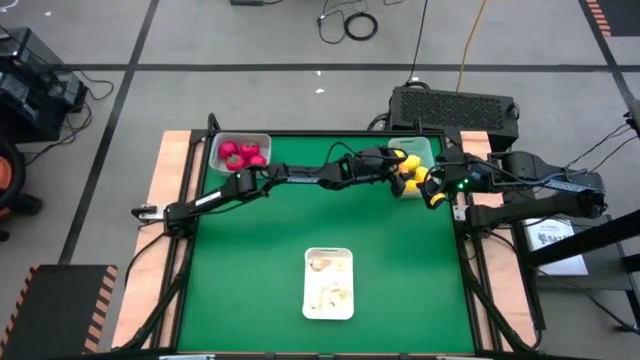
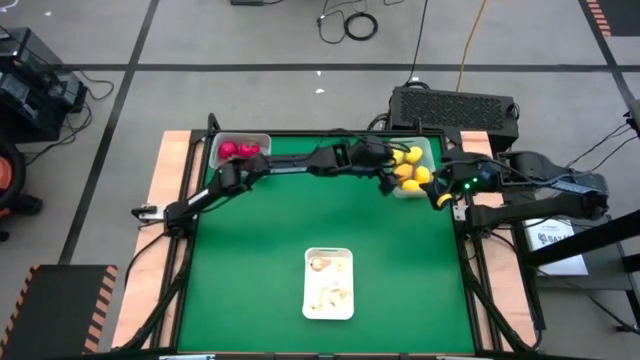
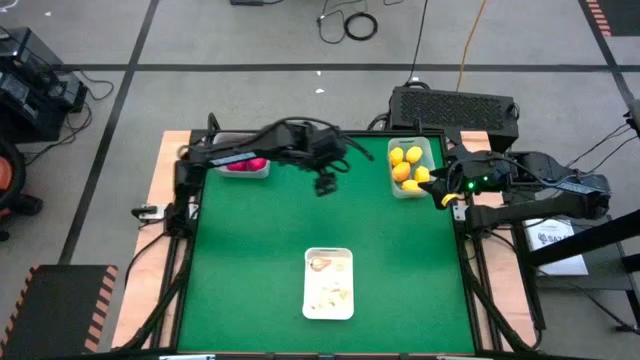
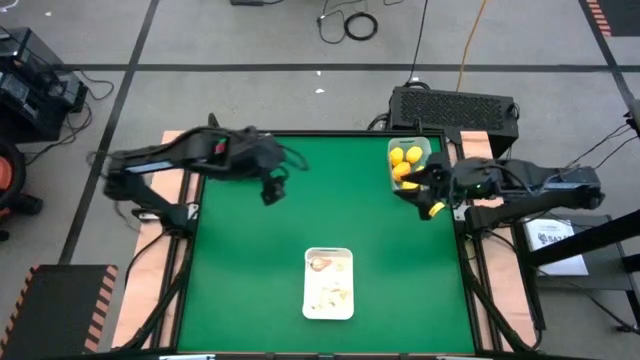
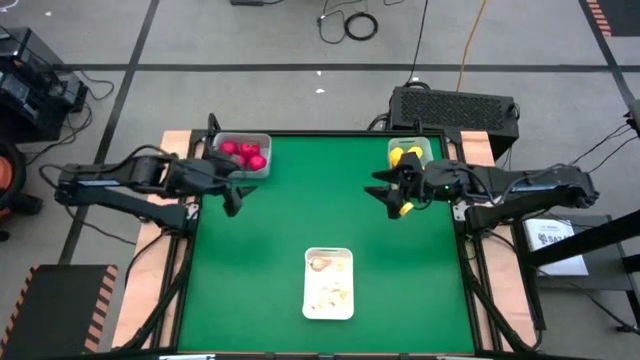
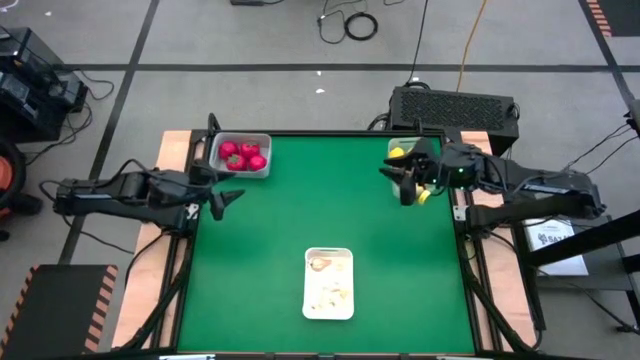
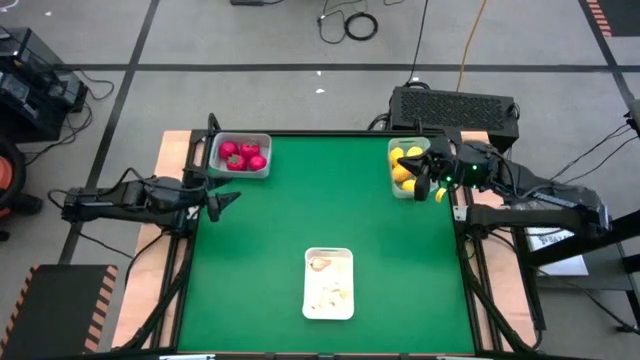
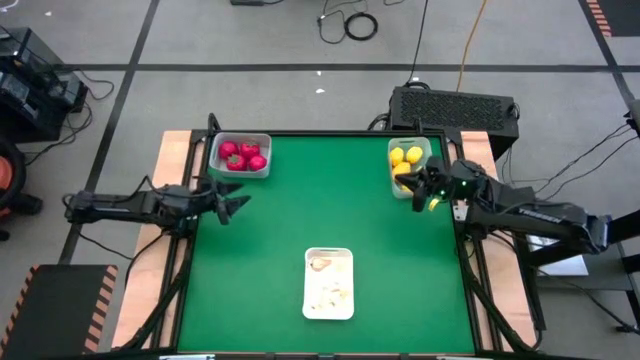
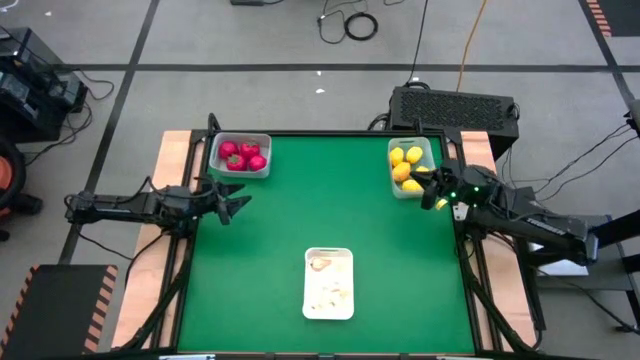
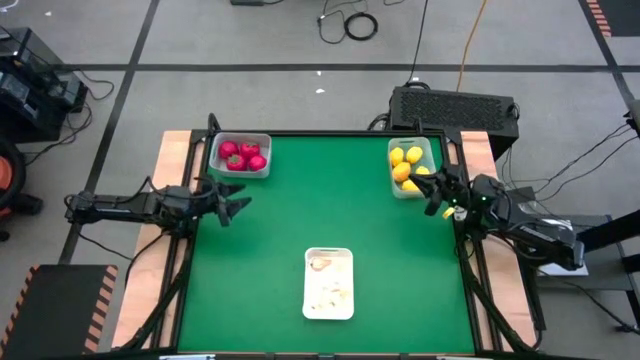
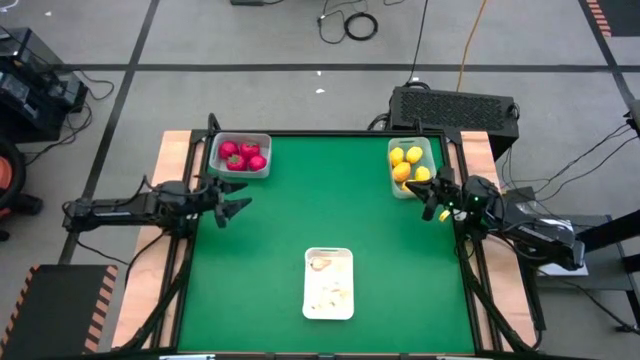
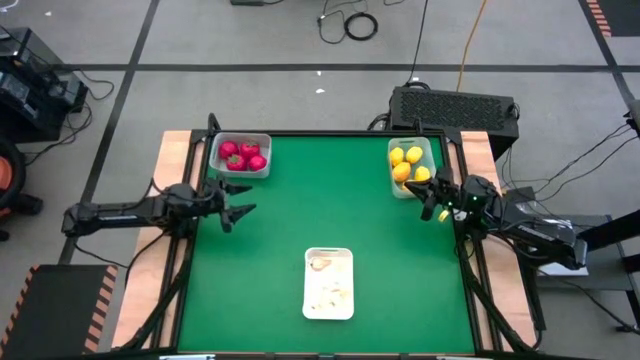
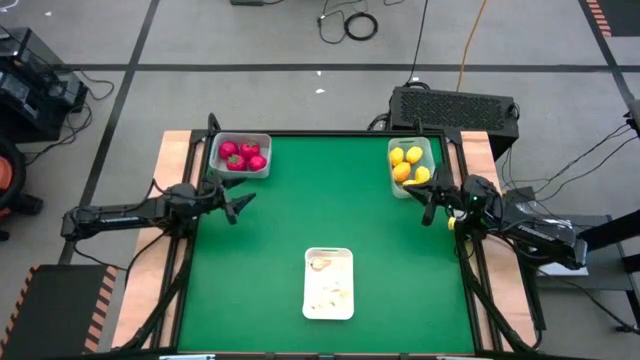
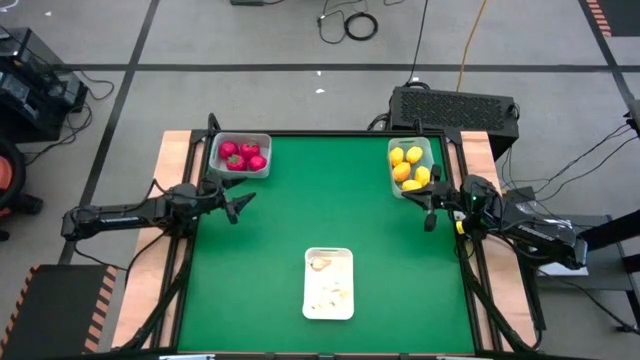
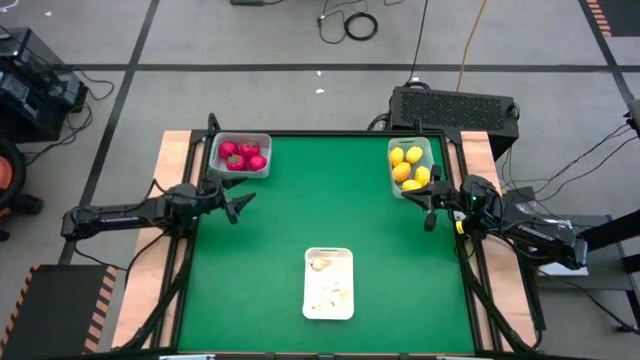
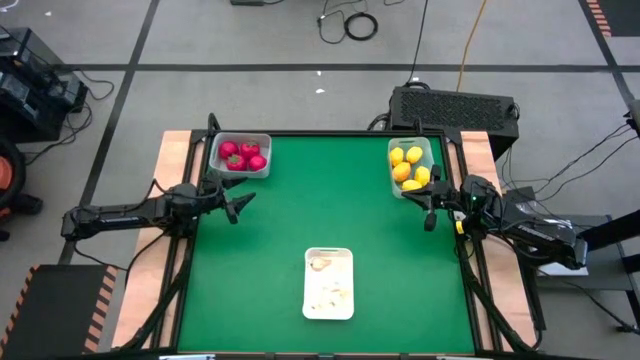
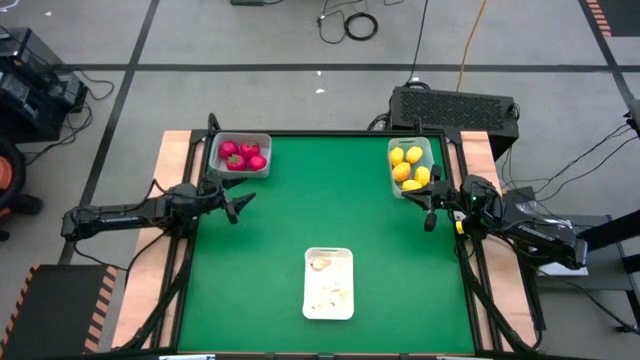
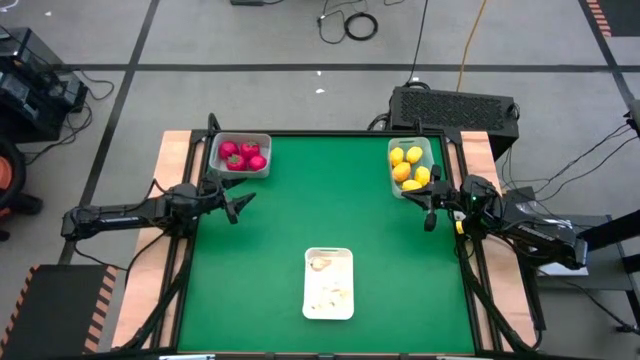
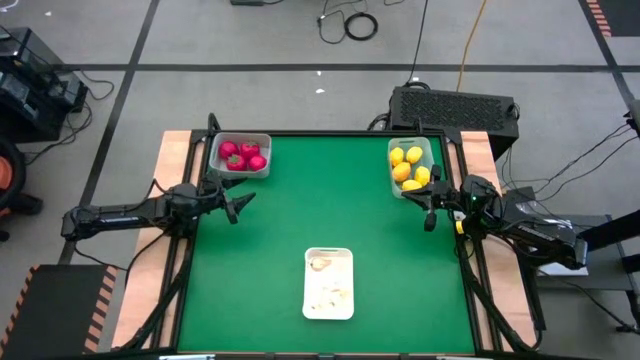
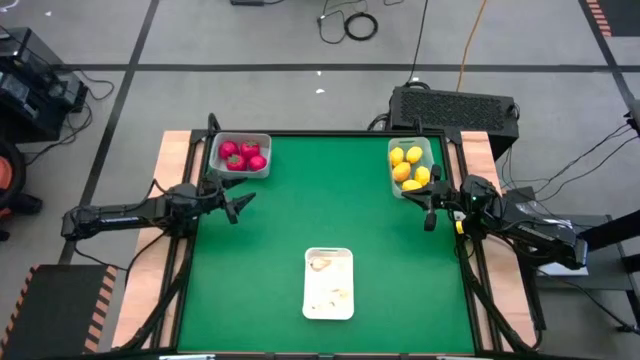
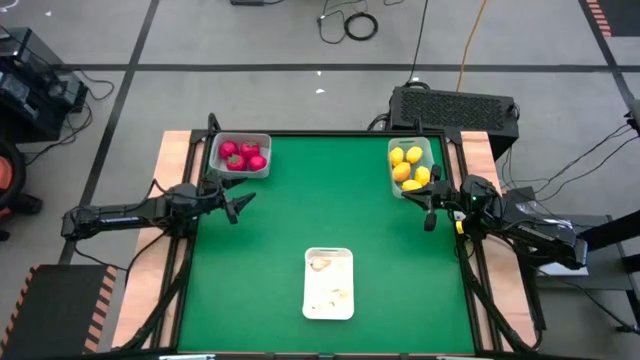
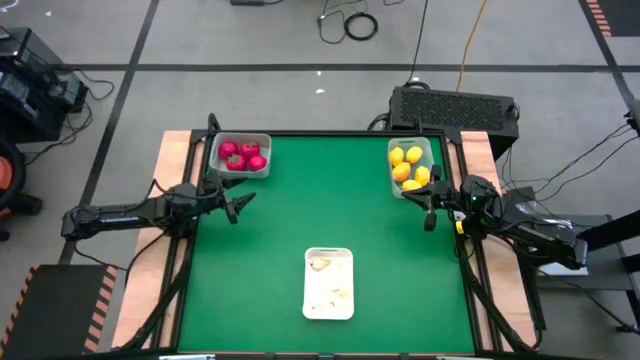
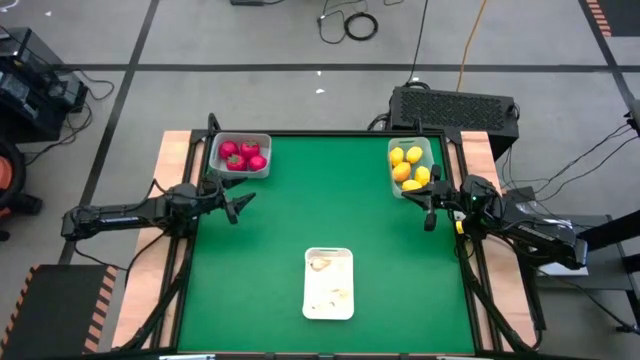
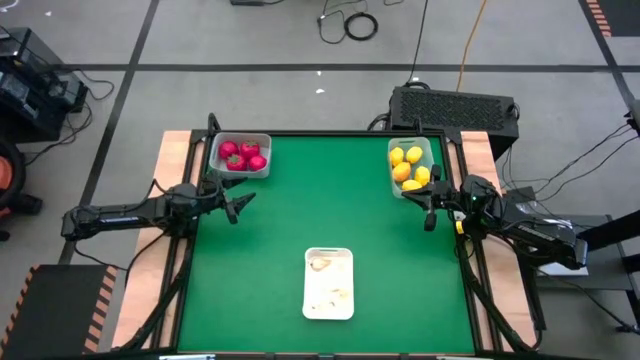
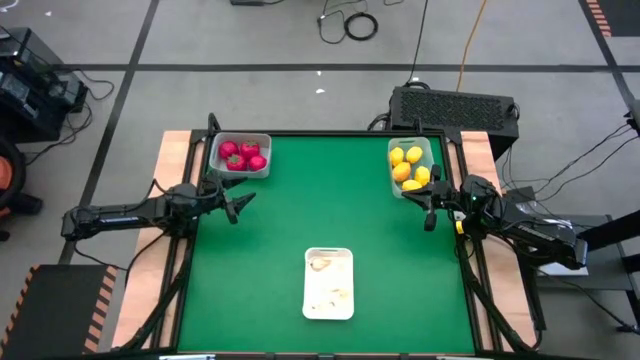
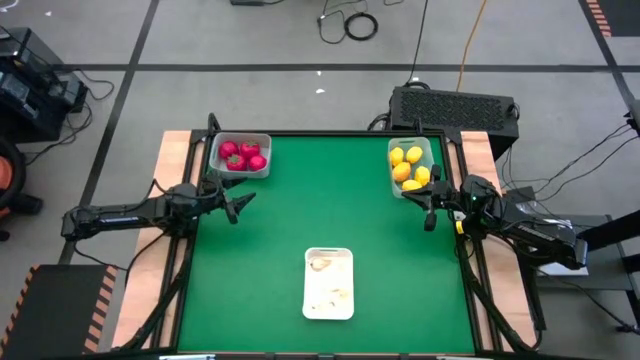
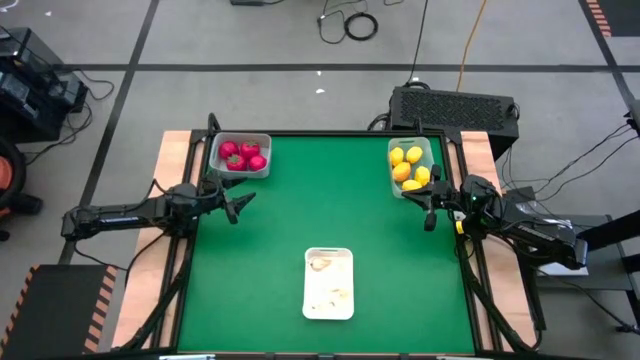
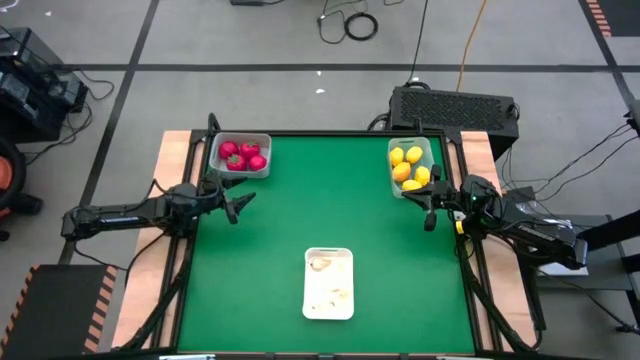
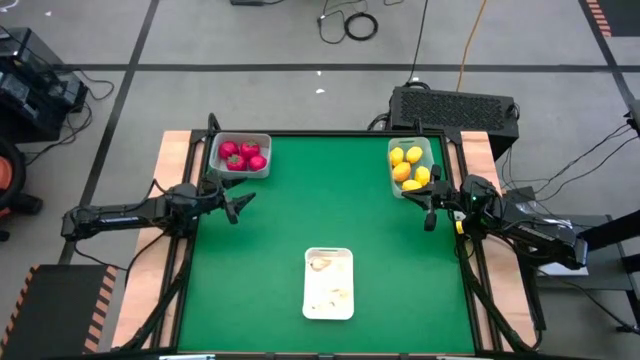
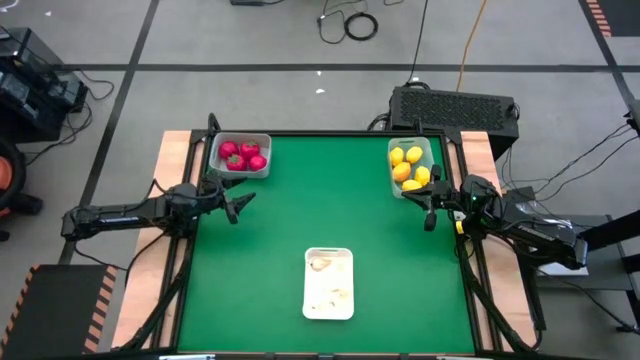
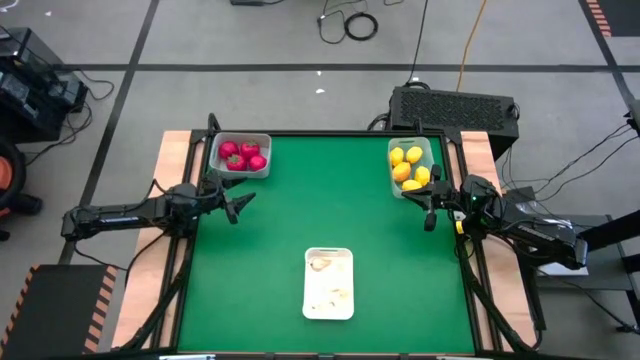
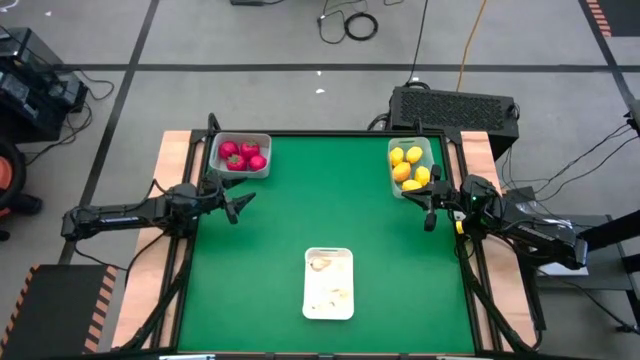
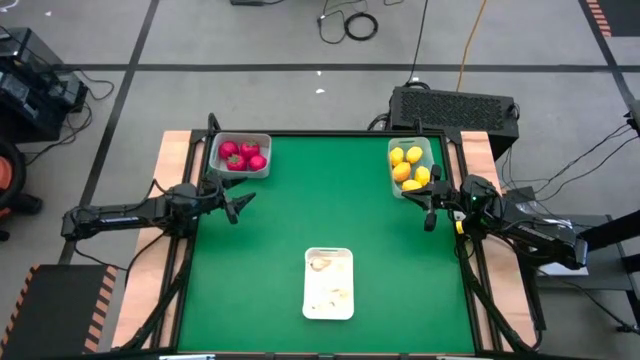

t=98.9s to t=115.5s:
Task: Sort produce into baskets
Return to Home Position

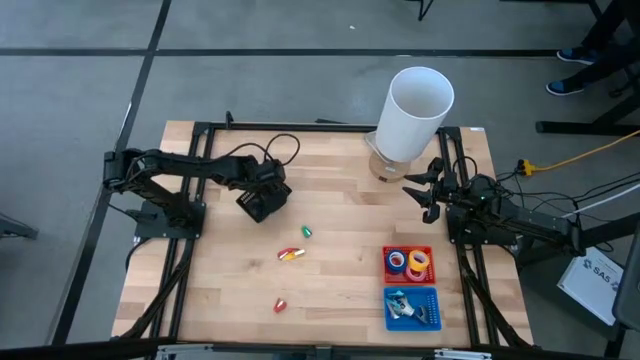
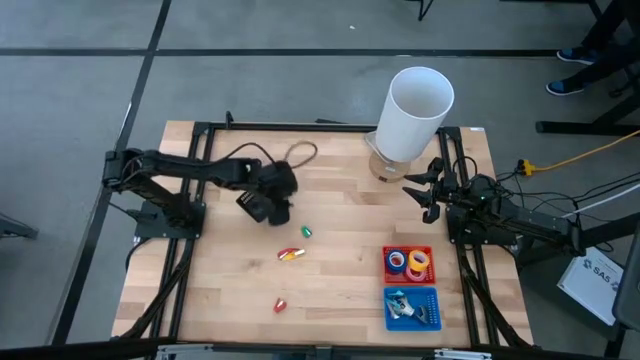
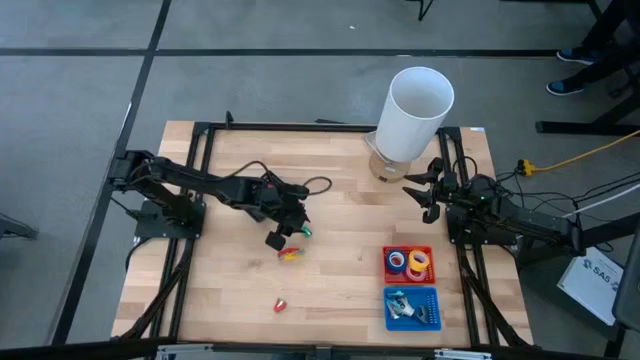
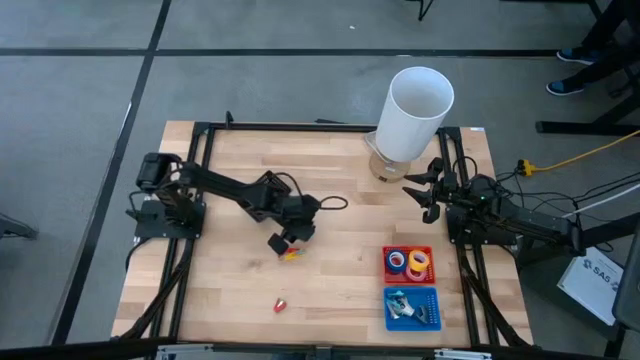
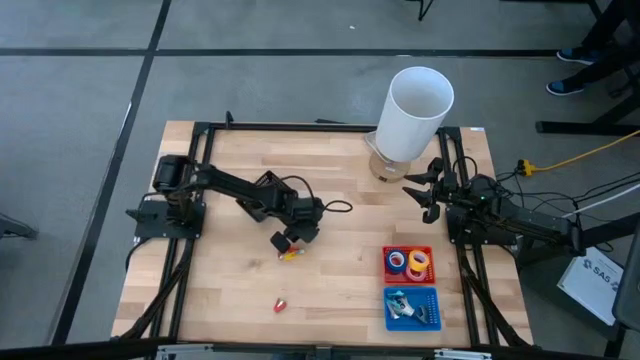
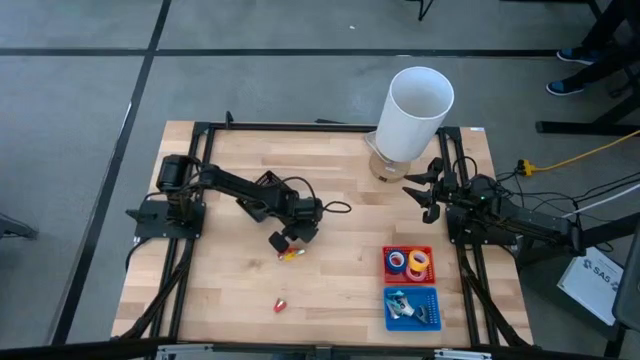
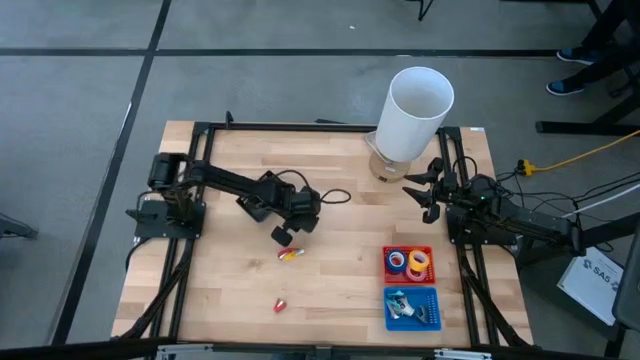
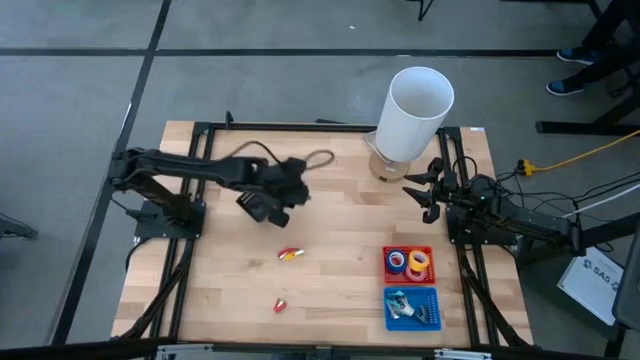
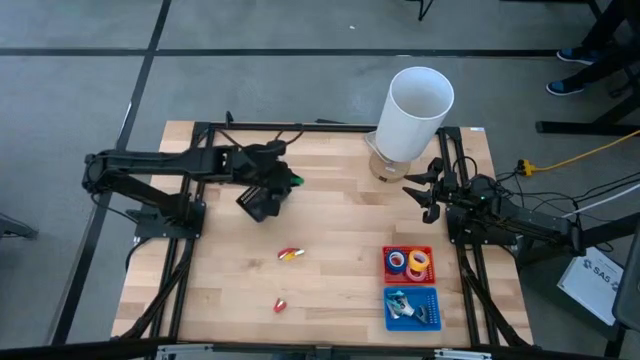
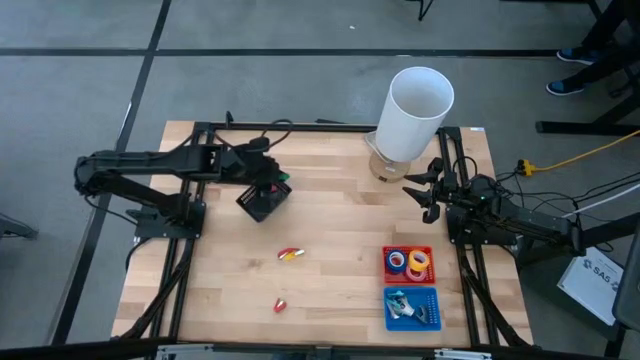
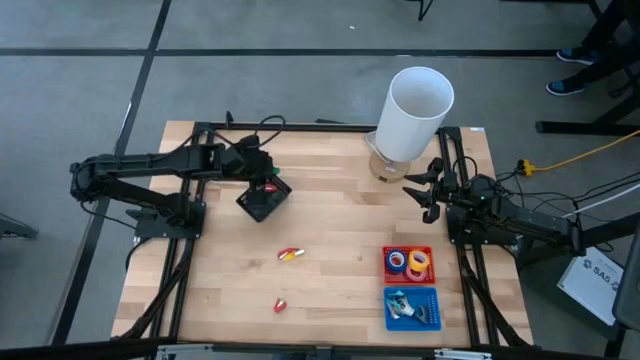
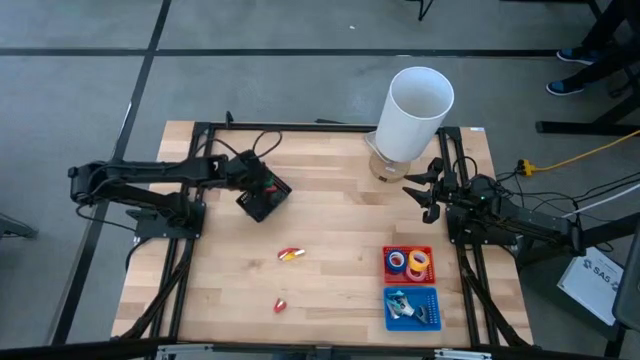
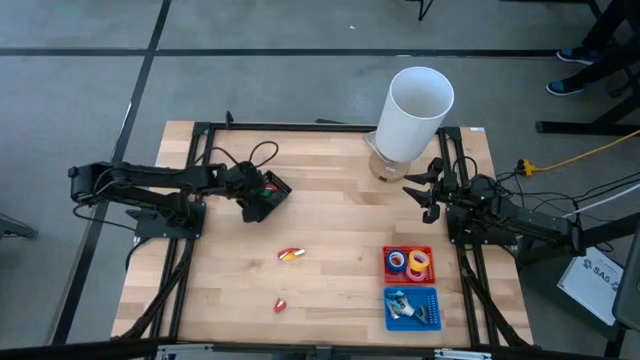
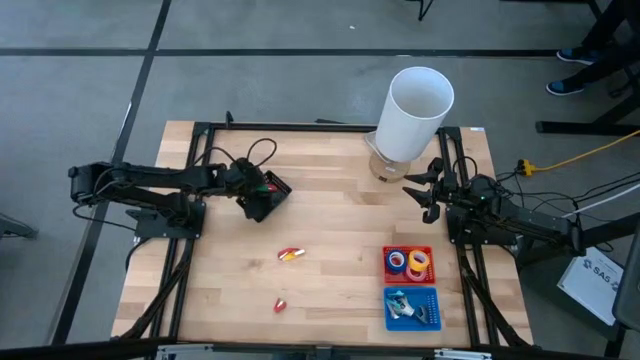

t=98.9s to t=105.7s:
Task: Pick and place Stapler, Stapler remover, tape
Put the green stapler into the black basket
